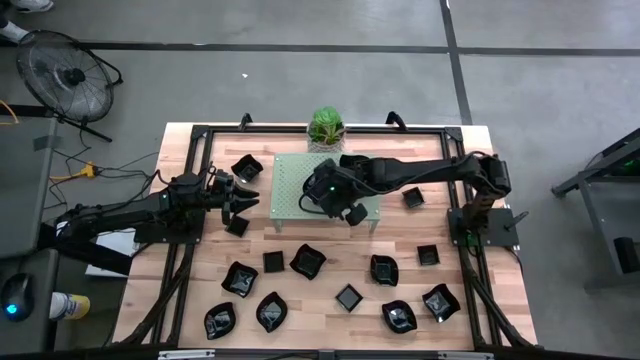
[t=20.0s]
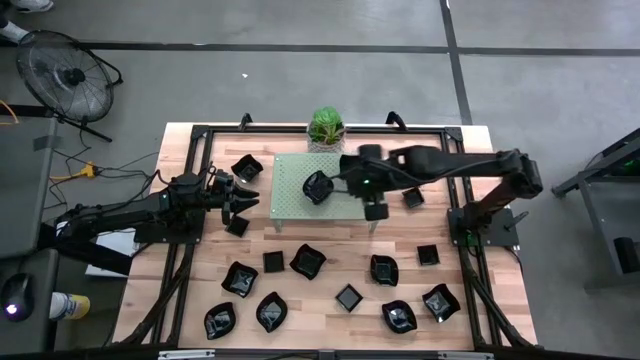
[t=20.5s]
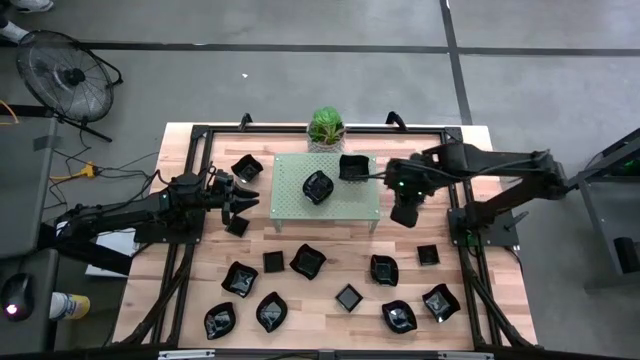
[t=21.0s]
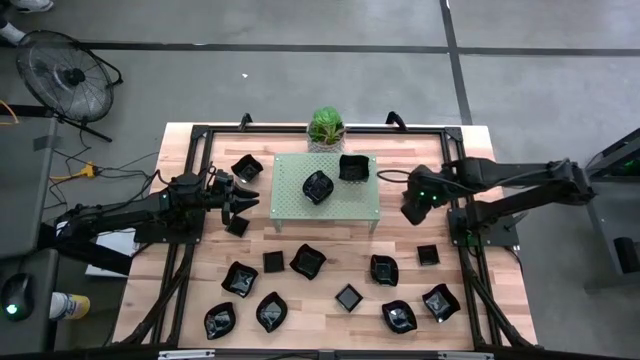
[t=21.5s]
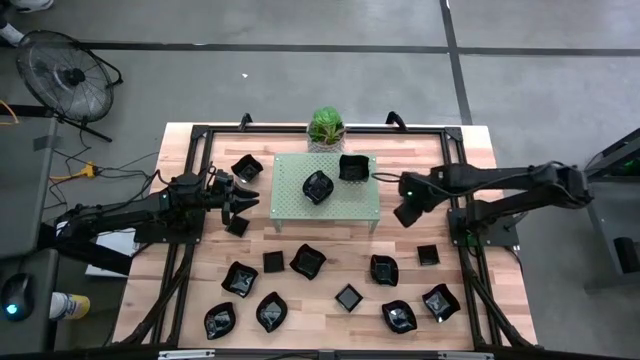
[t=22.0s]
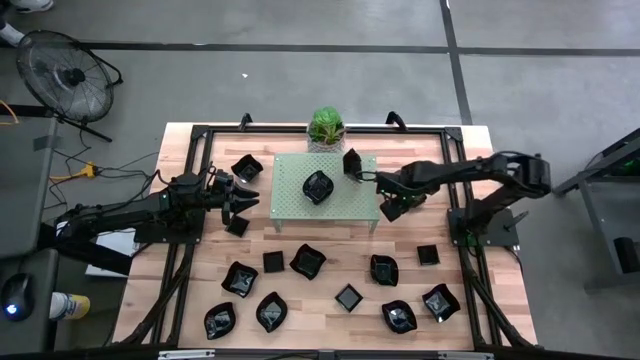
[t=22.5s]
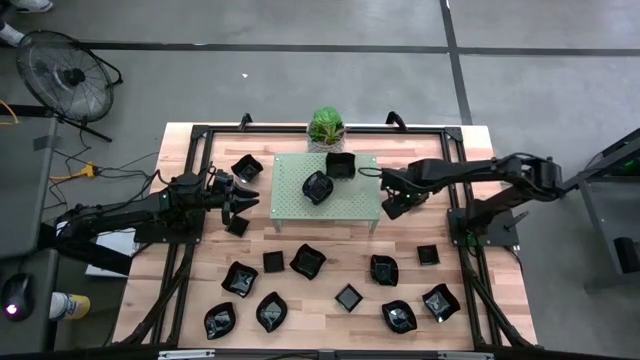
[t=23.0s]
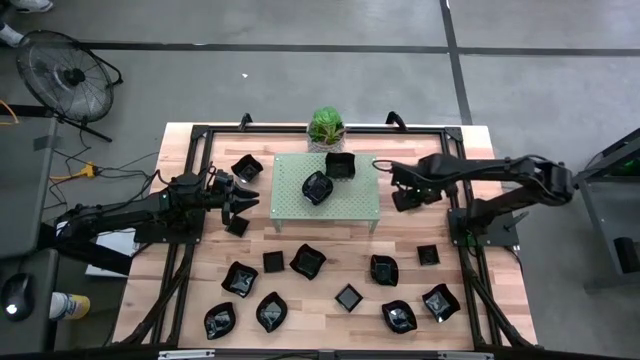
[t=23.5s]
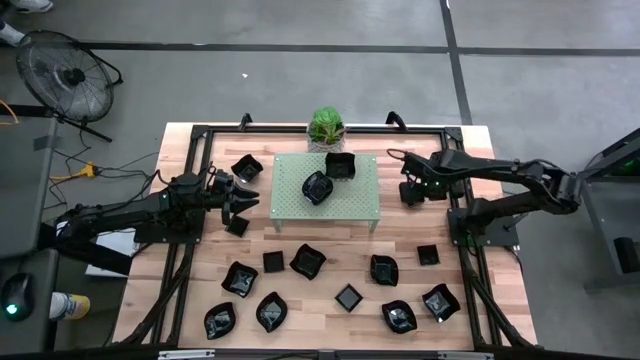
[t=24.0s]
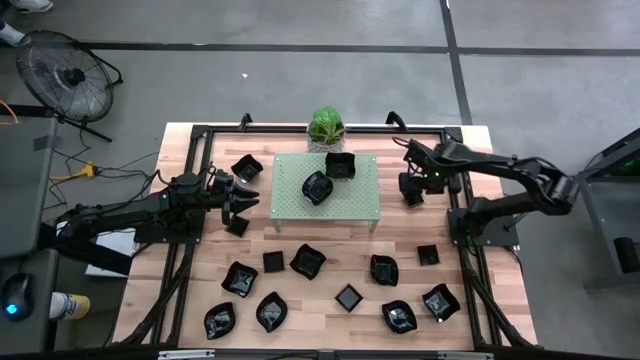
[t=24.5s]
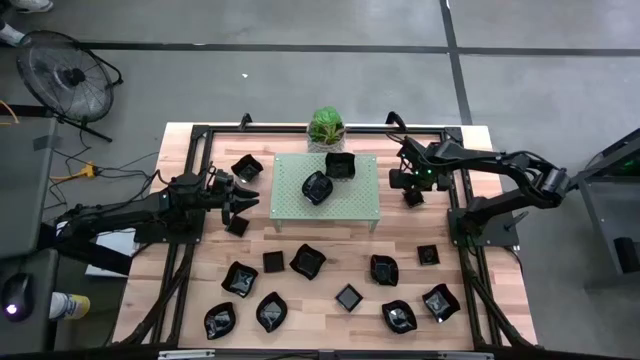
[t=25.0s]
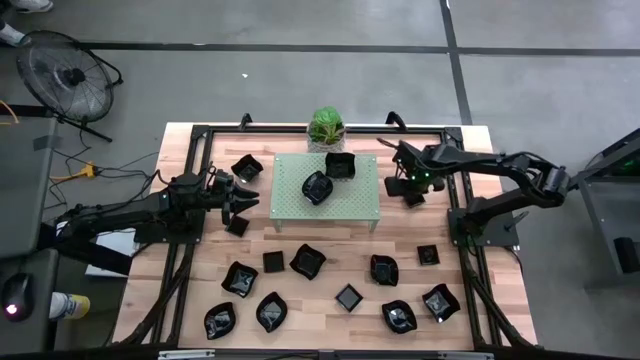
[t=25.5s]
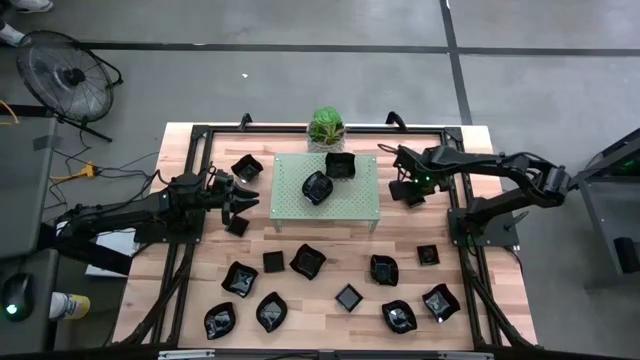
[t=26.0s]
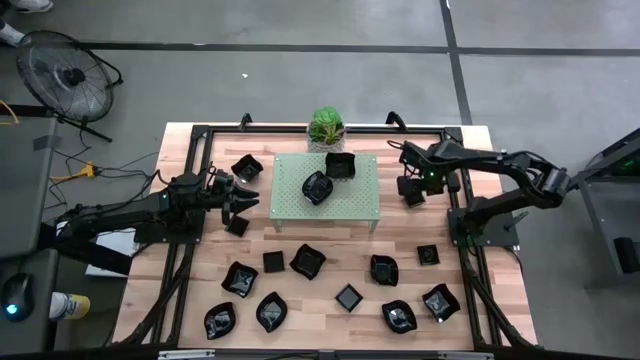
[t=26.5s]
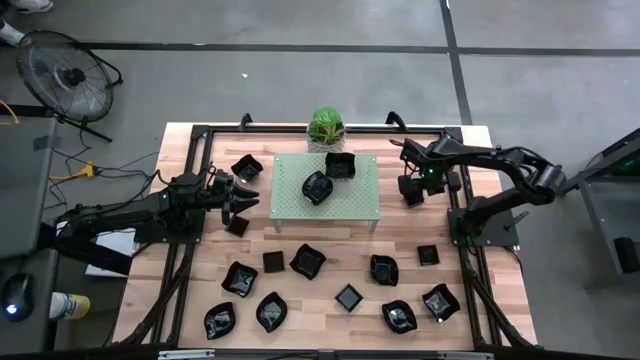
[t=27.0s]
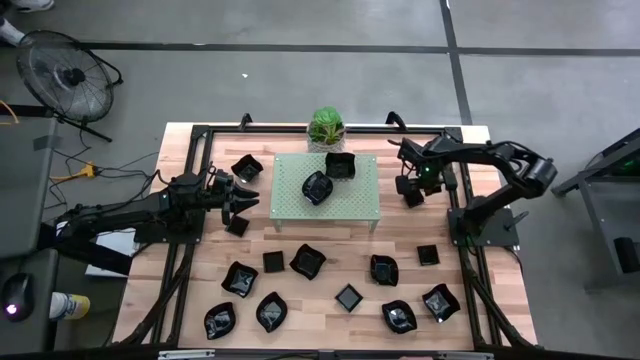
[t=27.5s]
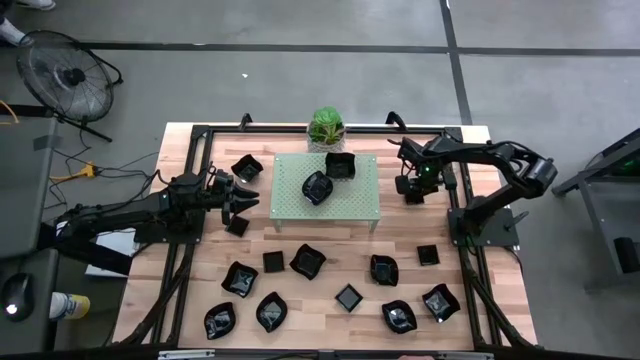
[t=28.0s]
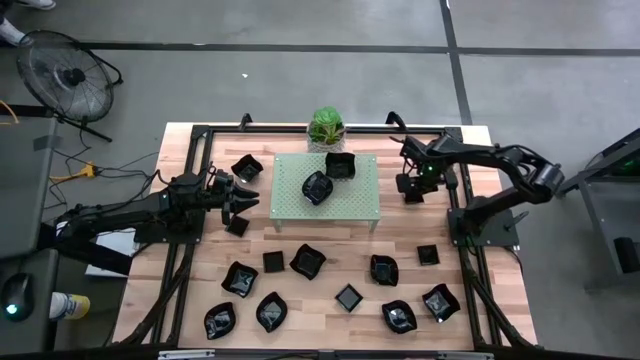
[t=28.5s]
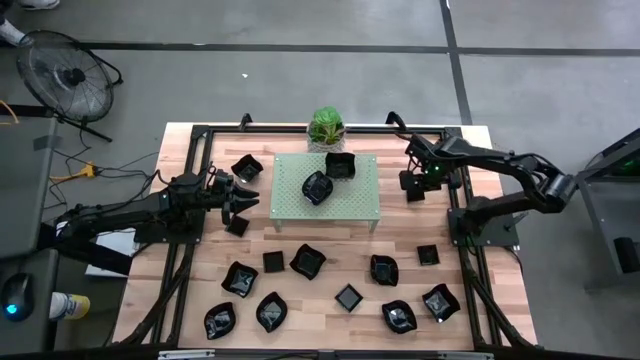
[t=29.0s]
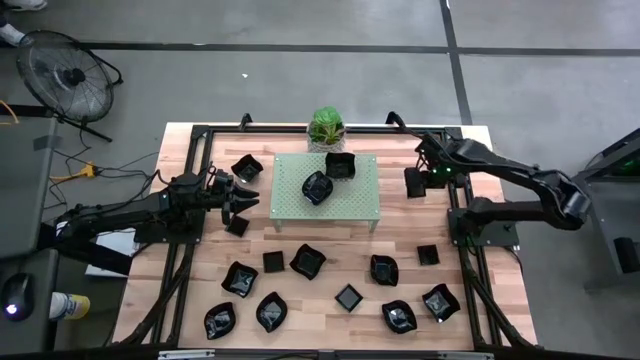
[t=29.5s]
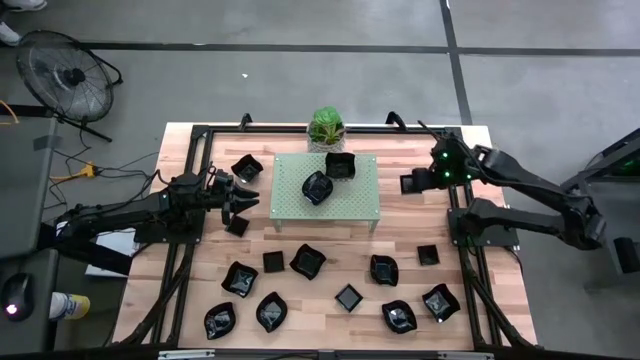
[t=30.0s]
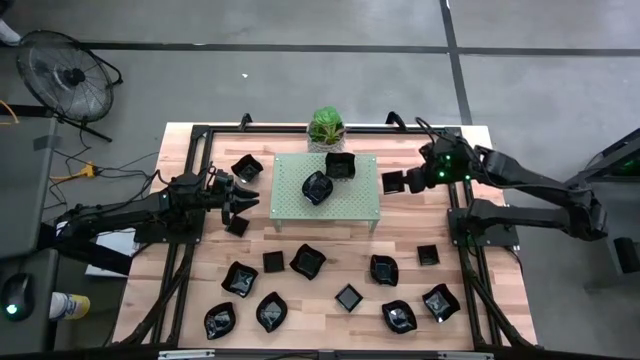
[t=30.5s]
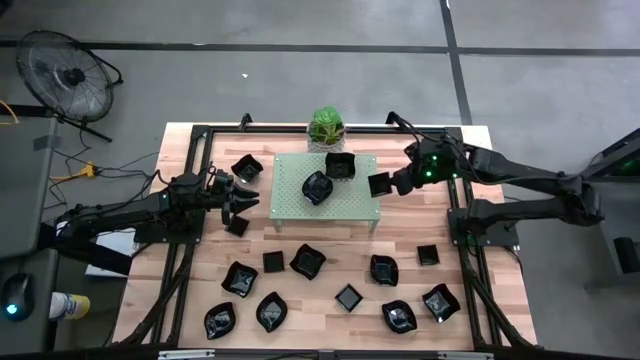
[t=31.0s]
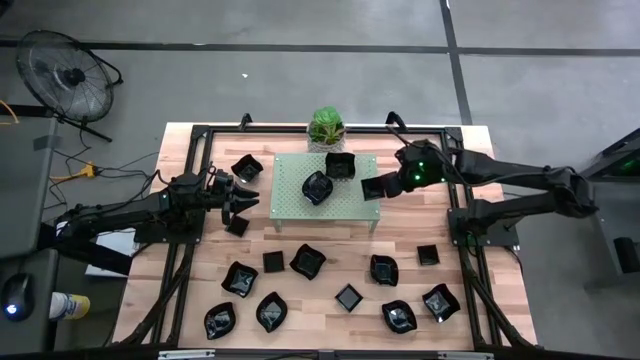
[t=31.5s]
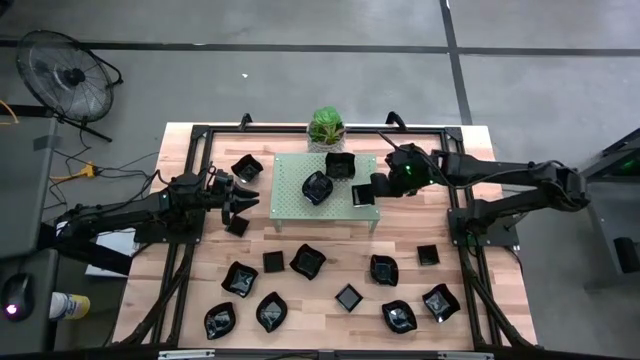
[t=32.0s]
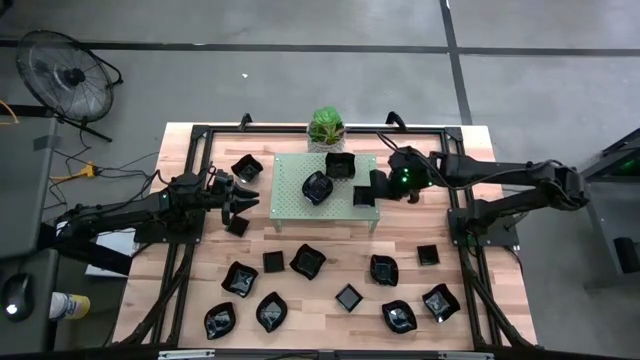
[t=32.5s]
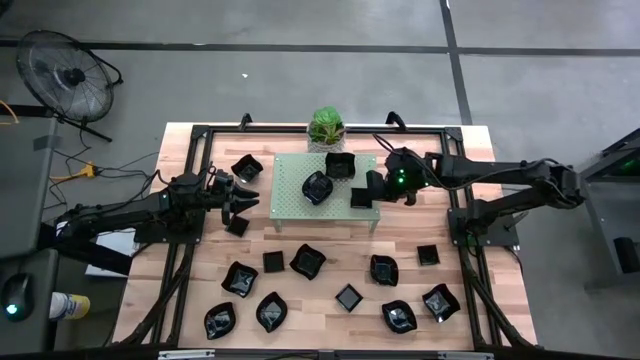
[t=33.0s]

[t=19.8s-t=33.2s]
Task: Pick & Place Mini shaped plates
Put the black square plate on the shelf

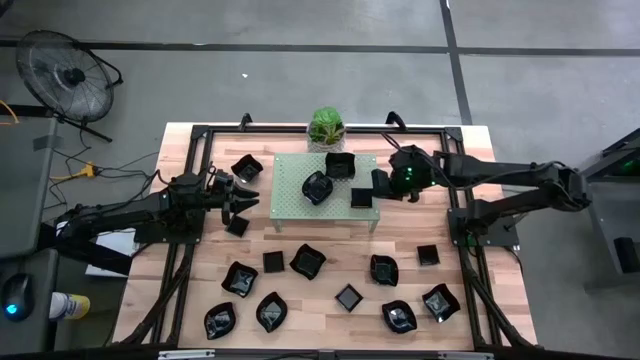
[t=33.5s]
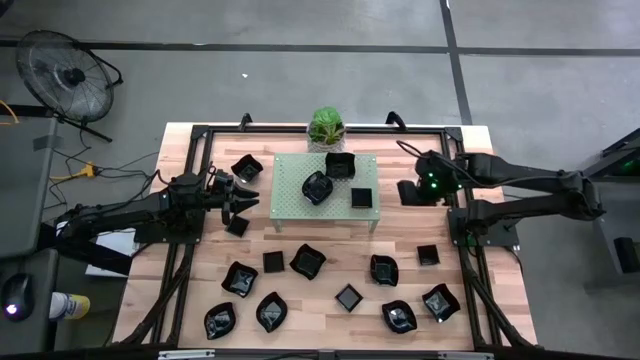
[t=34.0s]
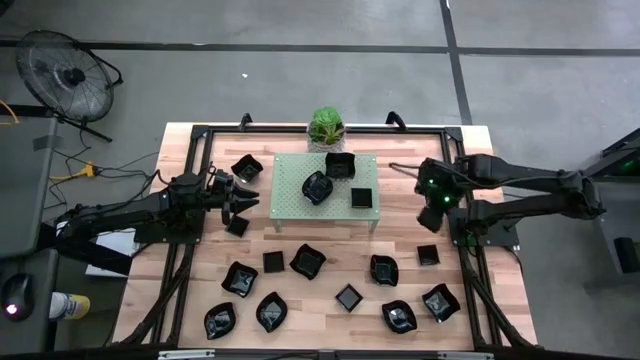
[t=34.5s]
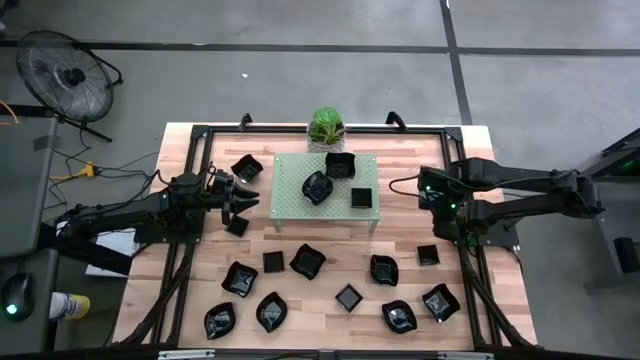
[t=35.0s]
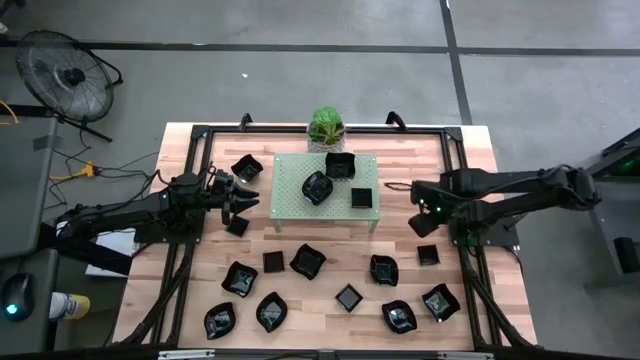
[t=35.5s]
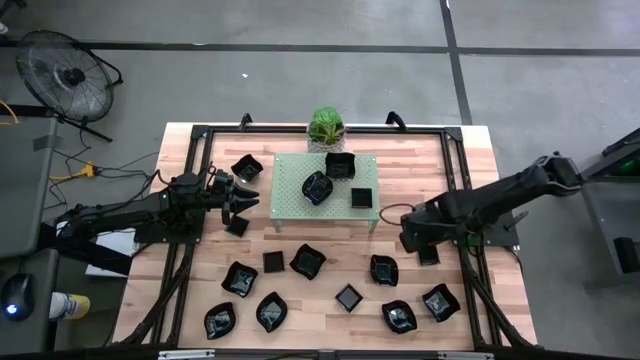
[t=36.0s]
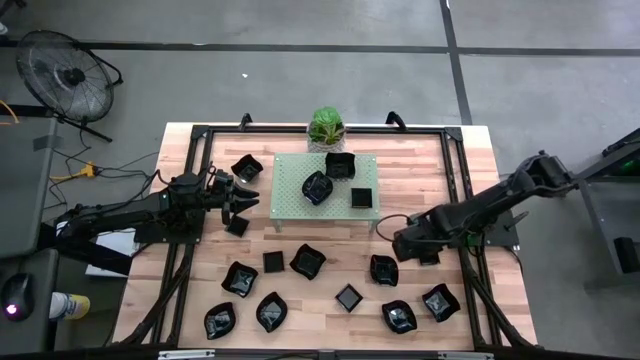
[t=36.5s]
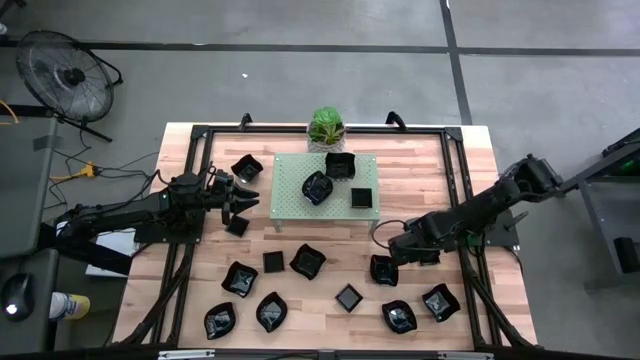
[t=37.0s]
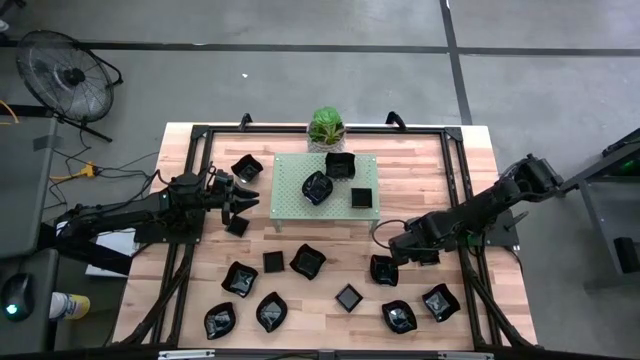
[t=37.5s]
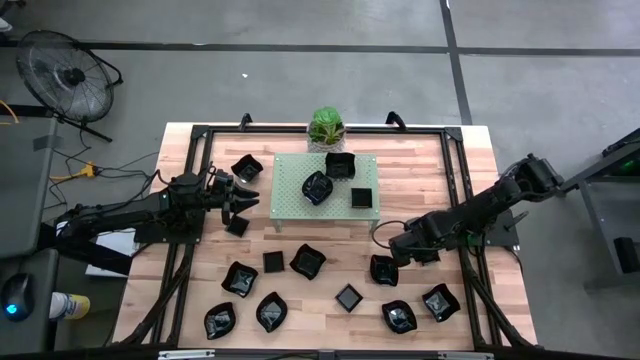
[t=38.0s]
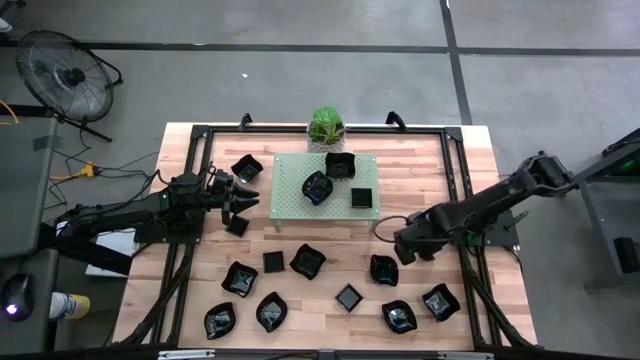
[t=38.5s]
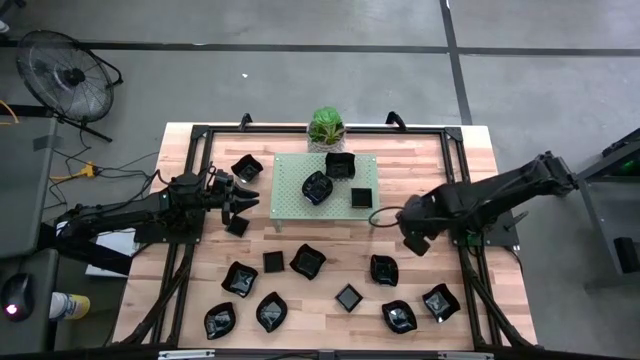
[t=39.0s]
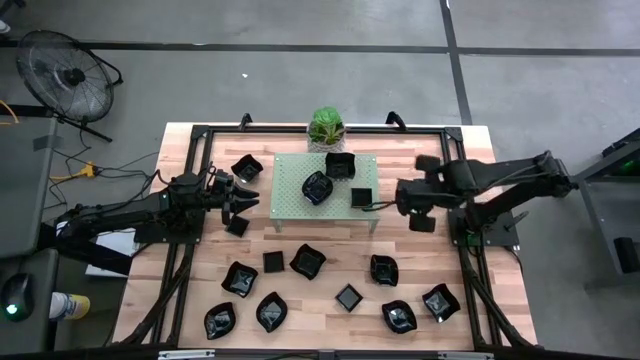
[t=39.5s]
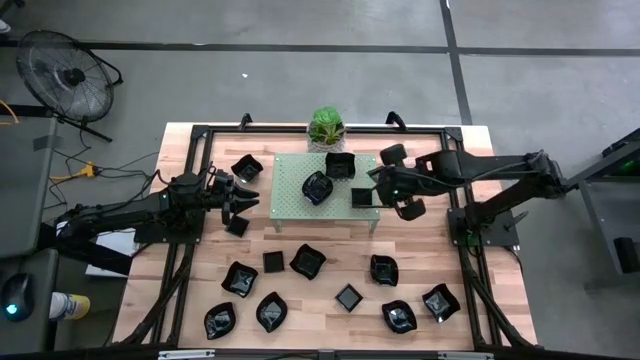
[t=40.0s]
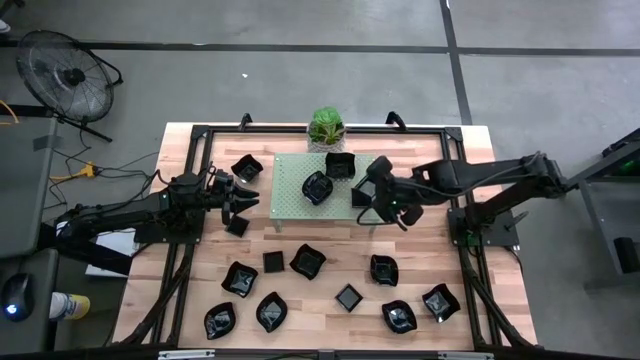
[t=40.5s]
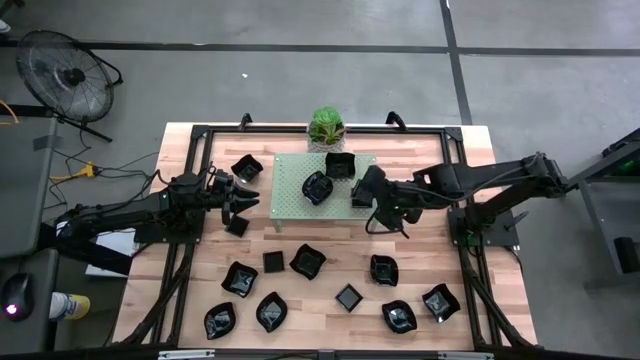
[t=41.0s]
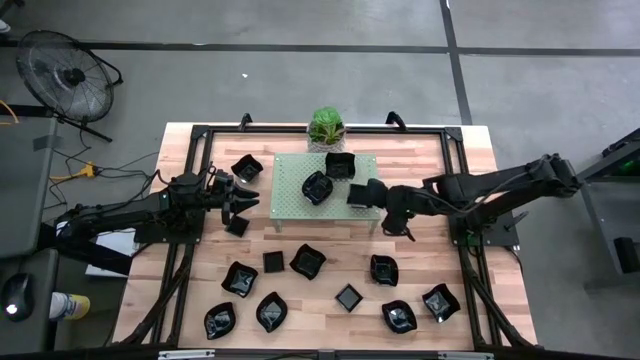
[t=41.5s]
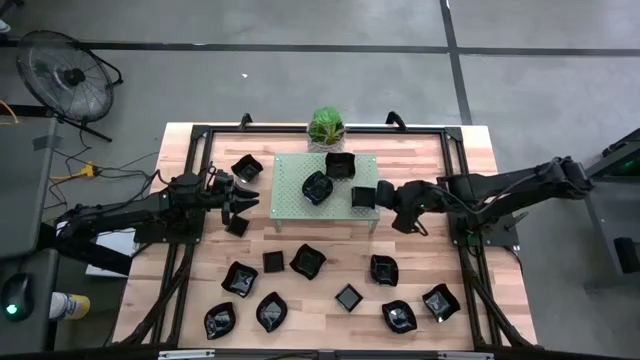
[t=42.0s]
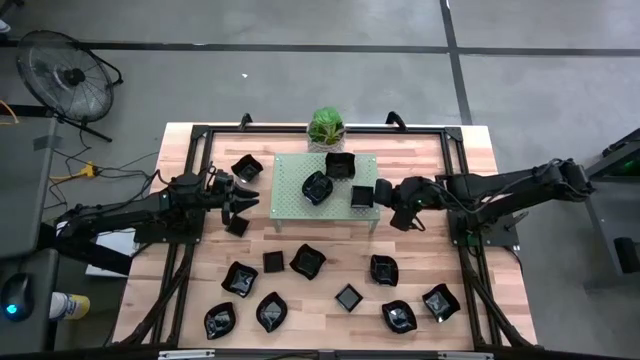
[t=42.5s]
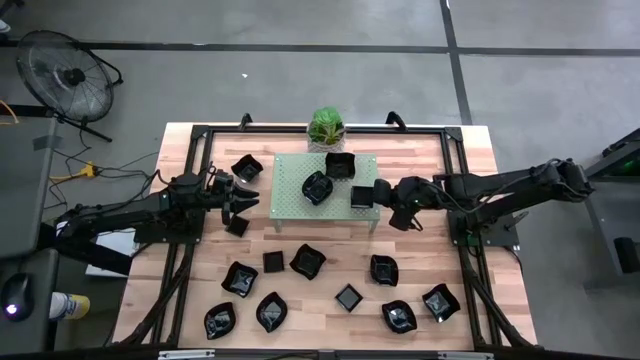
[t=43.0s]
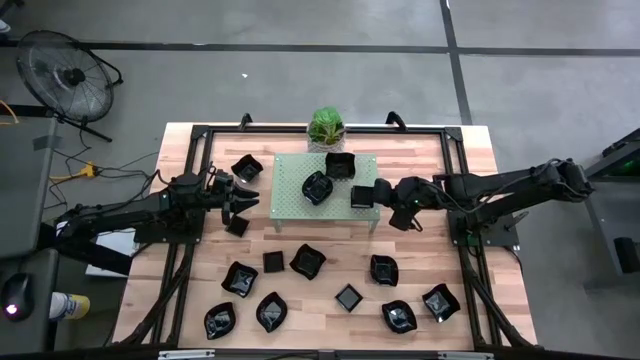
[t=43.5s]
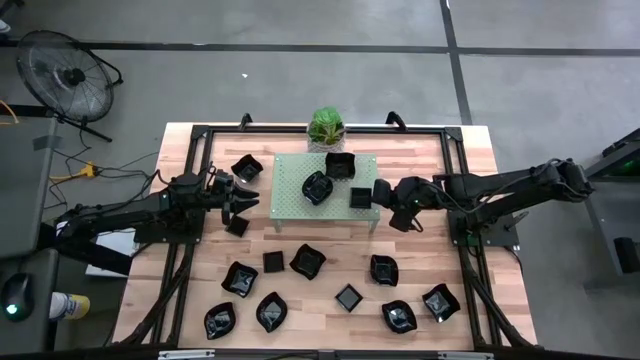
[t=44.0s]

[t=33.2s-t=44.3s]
Stack the black square plate on the other black square plate on the shelf
